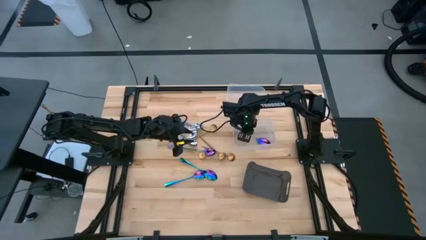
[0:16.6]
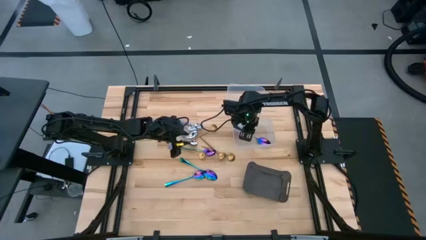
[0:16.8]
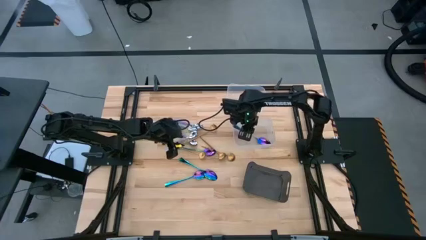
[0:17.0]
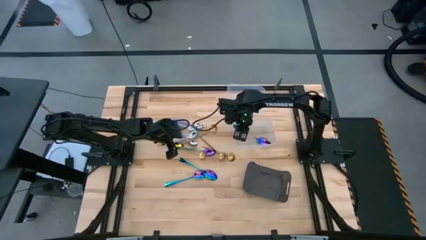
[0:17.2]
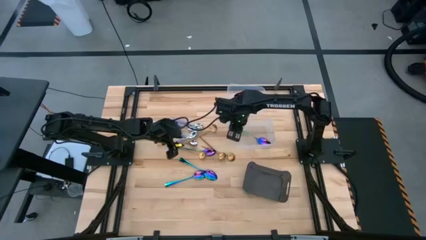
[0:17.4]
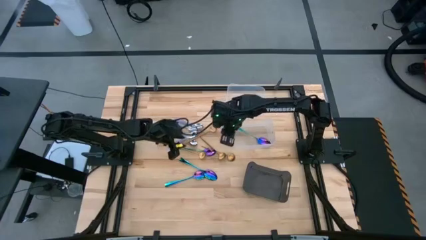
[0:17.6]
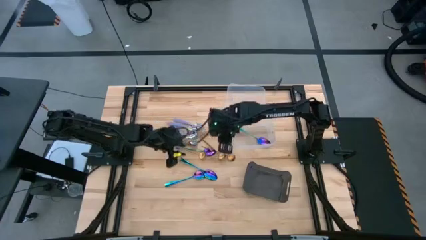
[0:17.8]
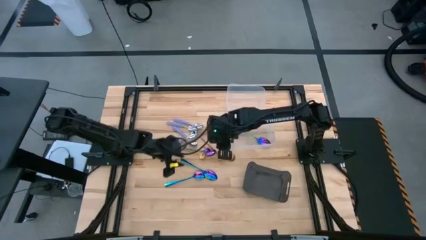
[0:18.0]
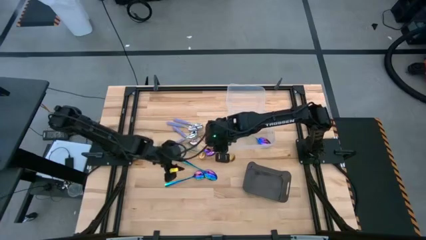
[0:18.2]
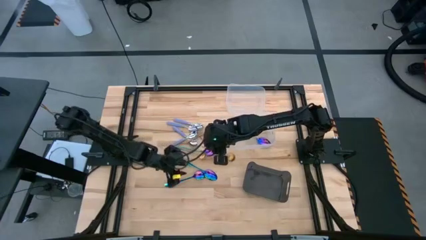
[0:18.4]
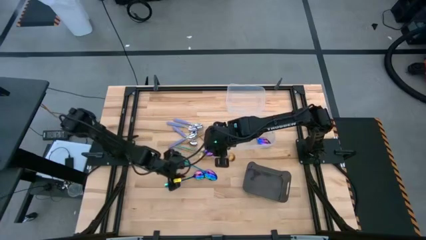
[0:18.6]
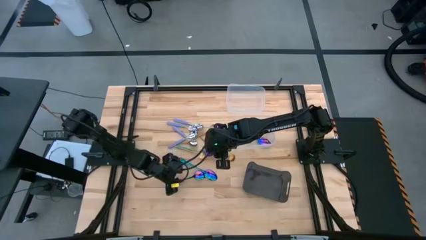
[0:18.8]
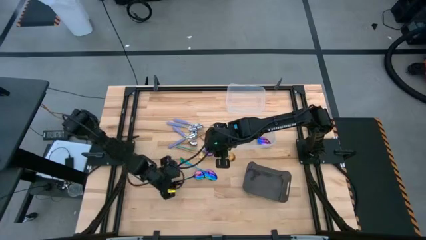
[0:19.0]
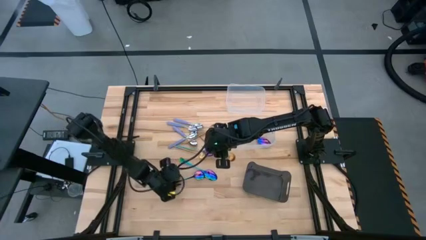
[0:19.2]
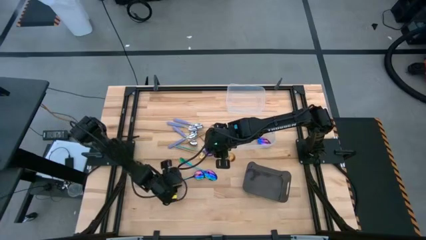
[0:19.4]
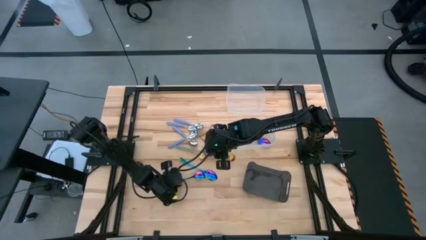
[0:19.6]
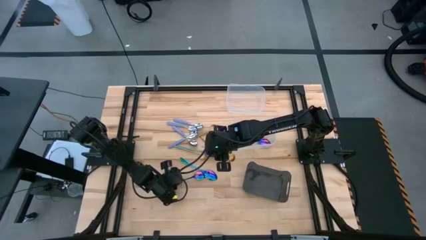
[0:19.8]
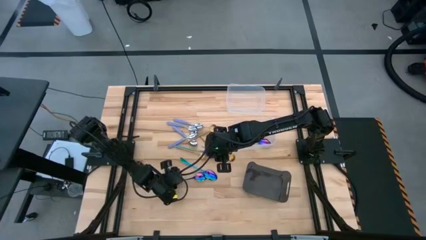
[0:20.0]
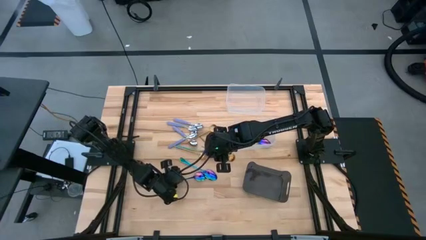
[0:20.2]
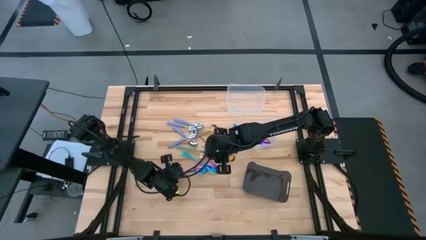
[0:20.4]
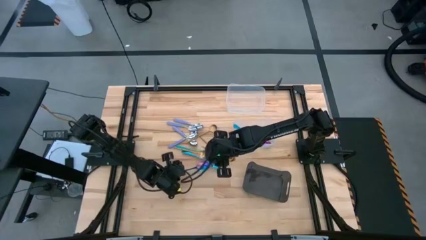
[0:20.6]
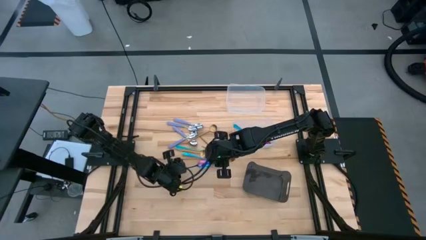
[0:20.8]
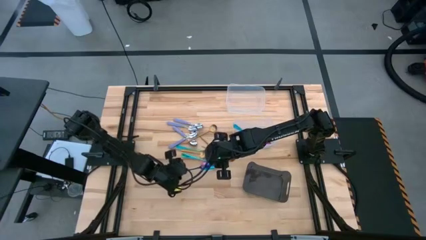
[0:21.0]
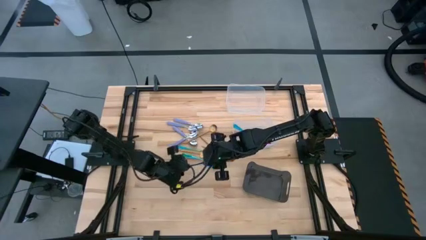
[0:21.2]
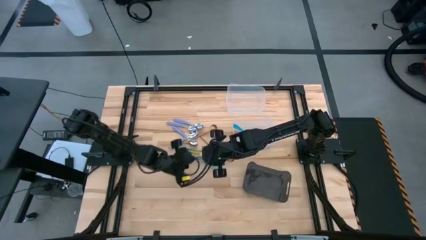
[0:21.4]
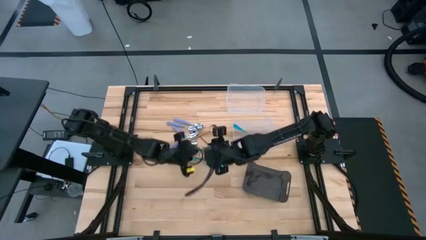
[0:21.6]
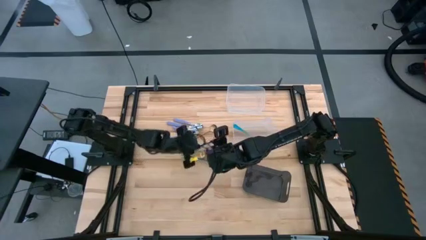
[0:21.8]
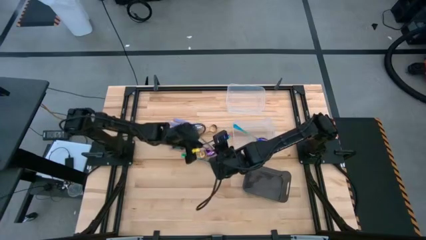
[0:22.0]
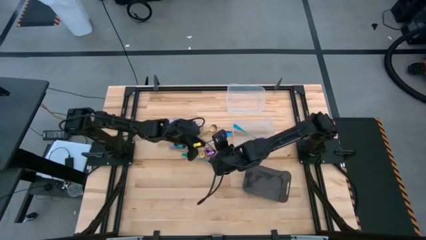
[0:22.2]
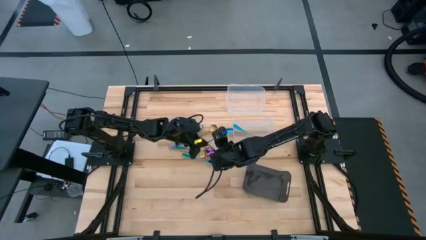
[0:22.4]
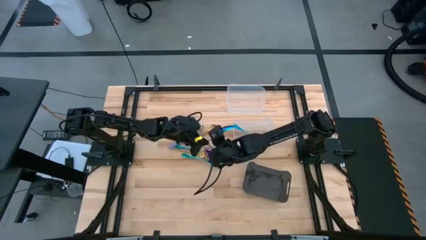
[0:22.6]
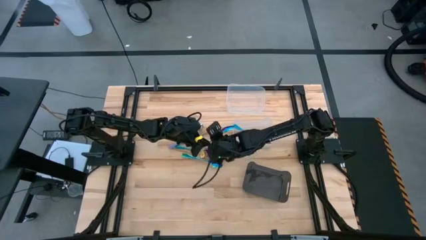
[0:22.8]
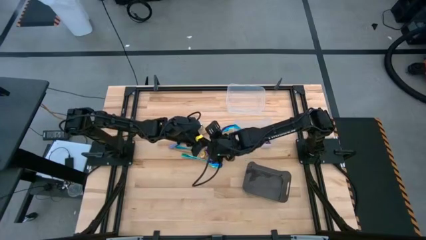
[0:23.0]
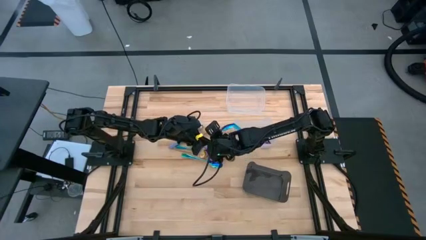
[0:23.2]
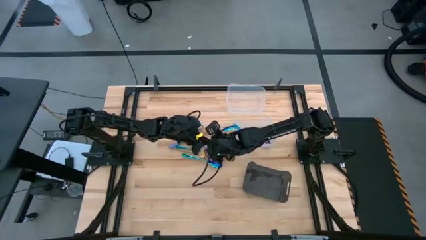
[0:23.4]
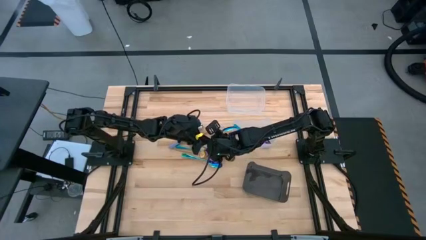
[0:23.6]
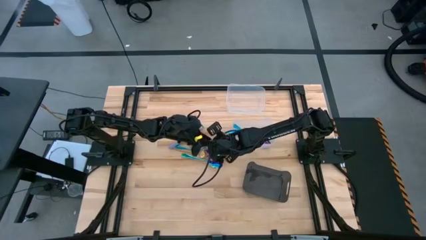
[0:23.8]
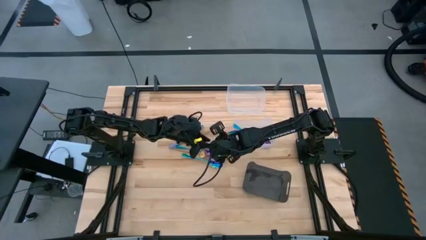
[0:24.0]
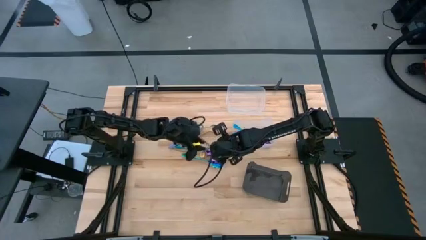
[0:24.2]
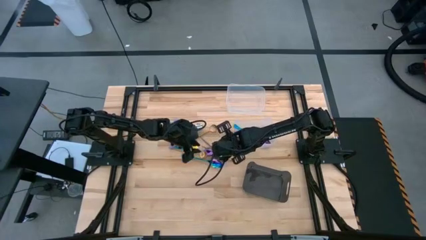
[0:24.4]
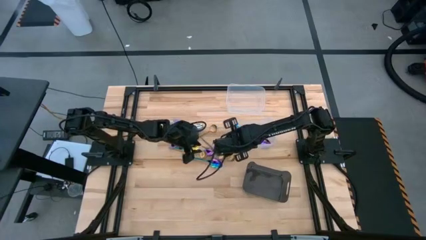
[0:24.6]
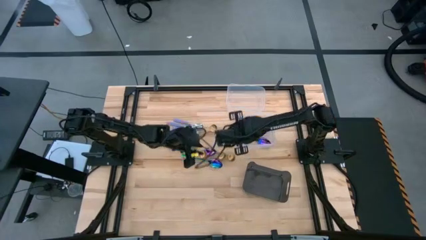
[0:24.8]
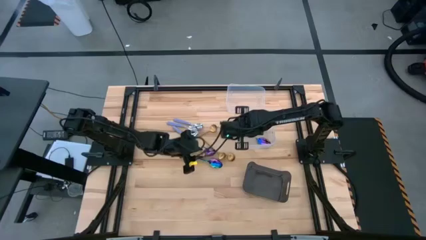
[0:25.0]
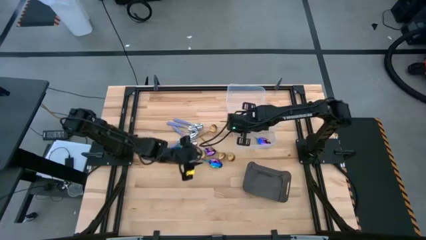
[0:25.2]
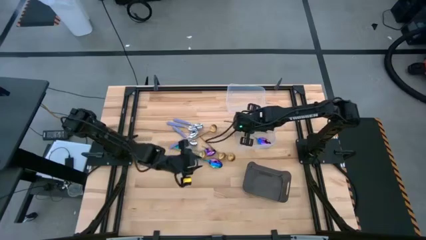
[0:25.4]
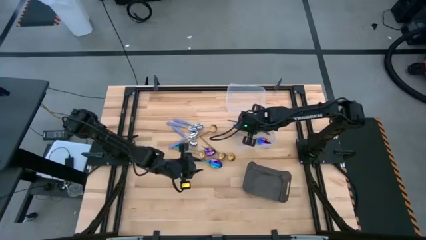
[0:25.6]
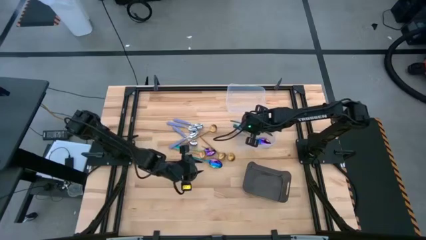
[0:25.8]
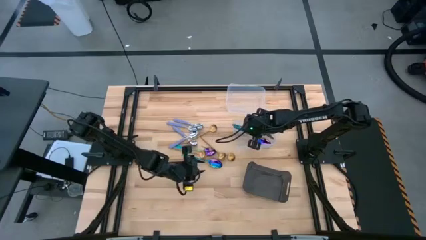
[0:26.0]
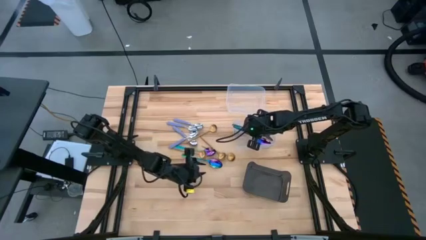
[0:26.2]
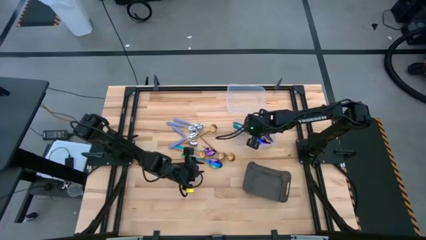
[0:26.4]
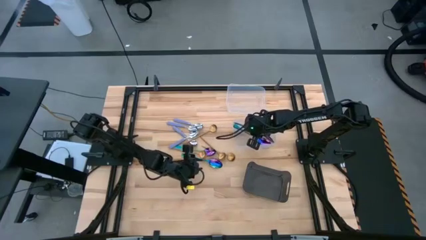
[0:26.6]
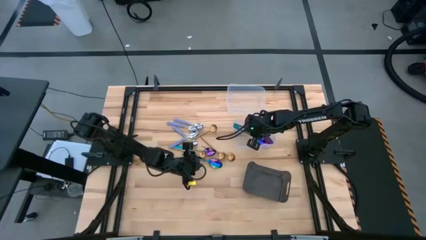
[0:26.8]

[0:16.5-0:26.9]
Task: Sort silverware by color (type)
Put the blue spoon into the bottom transparent bin

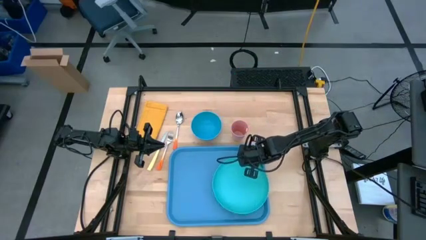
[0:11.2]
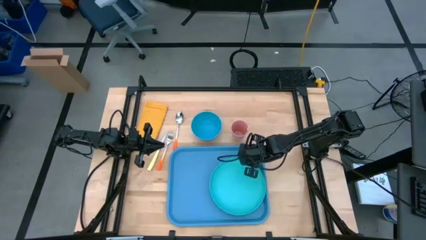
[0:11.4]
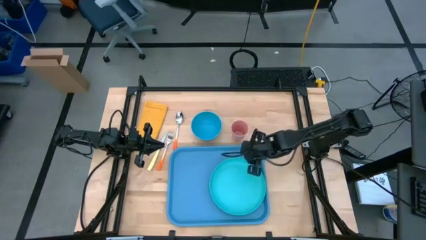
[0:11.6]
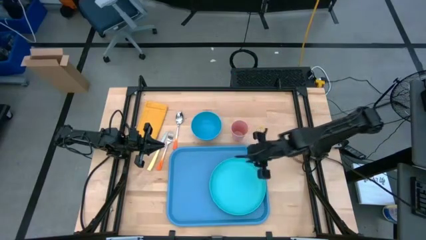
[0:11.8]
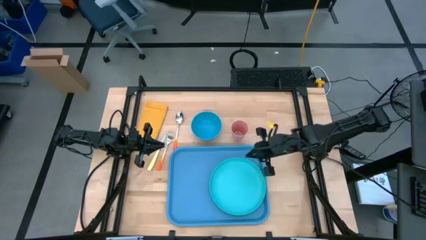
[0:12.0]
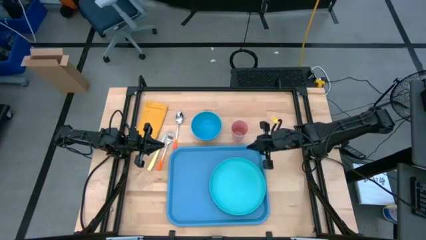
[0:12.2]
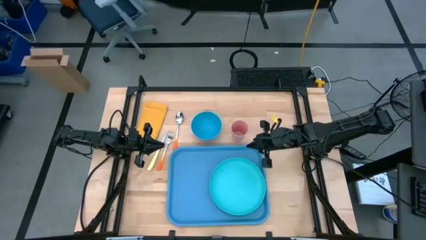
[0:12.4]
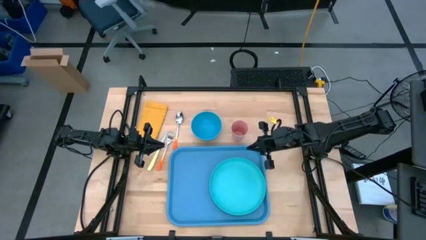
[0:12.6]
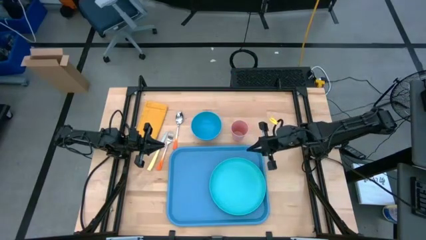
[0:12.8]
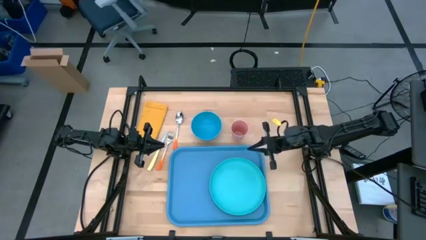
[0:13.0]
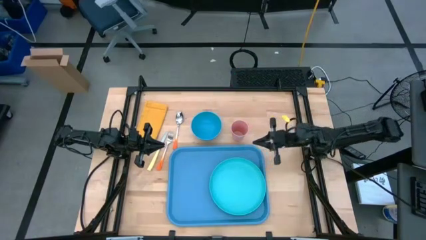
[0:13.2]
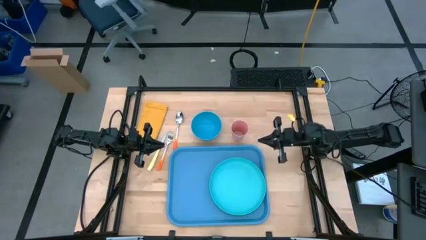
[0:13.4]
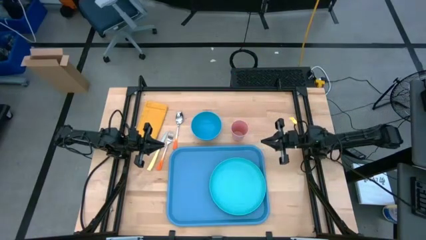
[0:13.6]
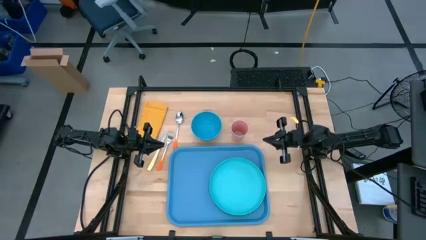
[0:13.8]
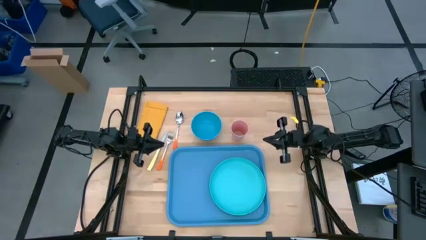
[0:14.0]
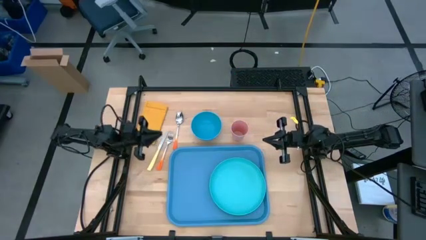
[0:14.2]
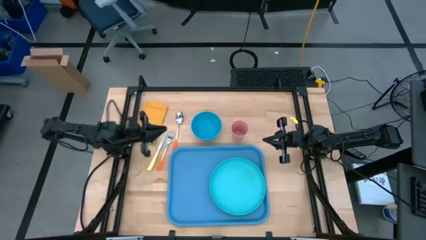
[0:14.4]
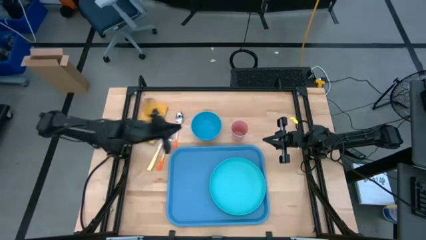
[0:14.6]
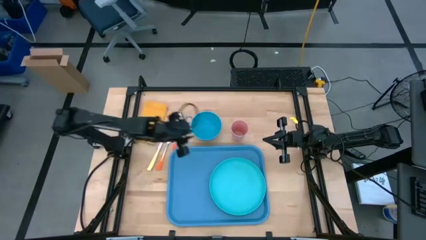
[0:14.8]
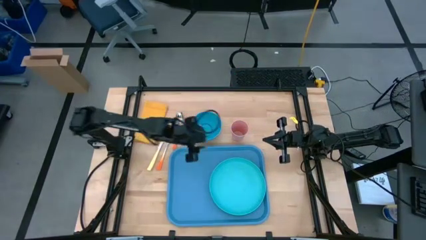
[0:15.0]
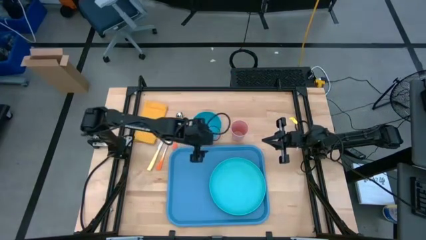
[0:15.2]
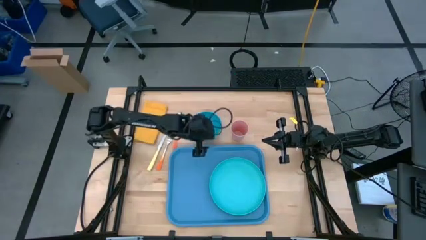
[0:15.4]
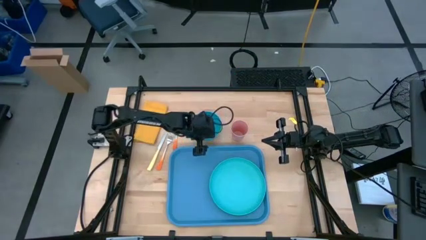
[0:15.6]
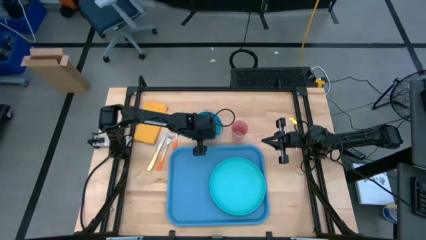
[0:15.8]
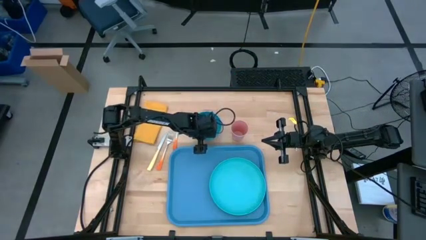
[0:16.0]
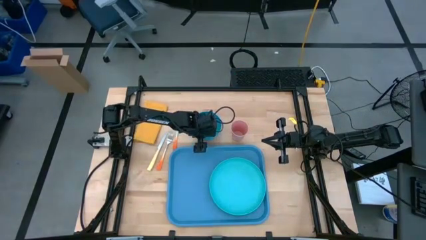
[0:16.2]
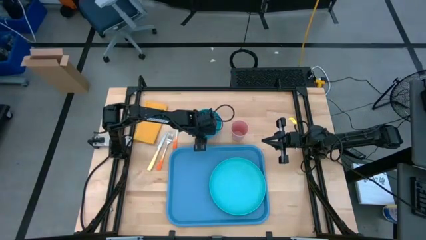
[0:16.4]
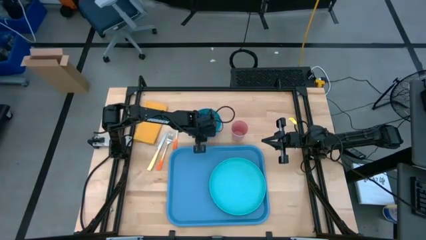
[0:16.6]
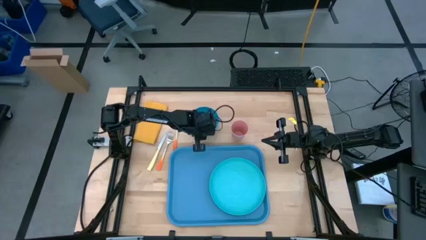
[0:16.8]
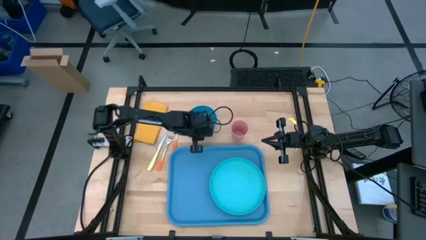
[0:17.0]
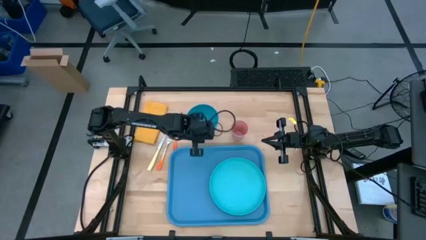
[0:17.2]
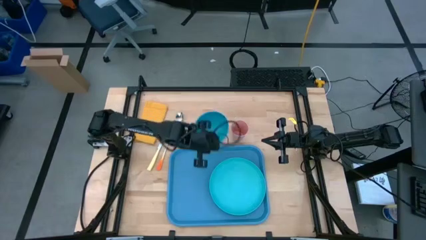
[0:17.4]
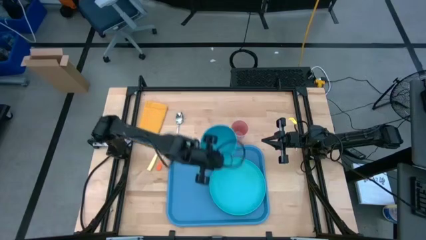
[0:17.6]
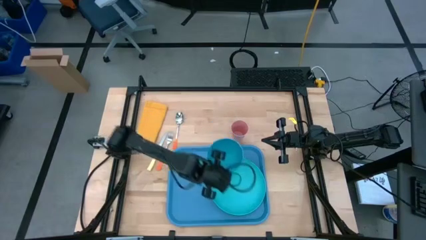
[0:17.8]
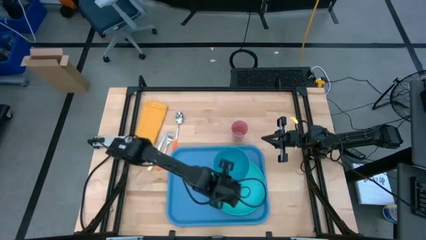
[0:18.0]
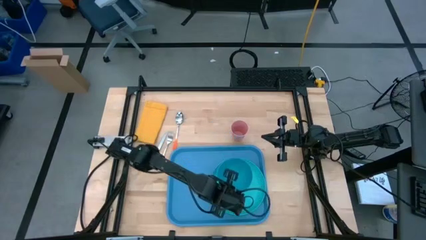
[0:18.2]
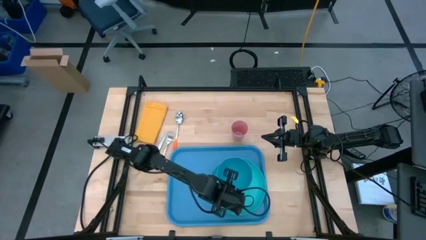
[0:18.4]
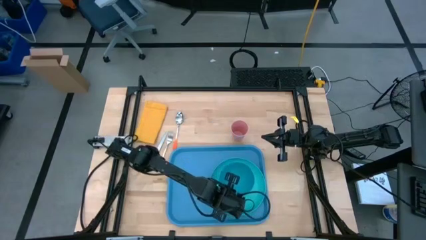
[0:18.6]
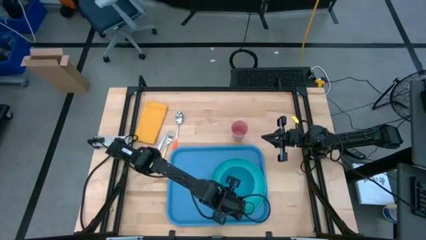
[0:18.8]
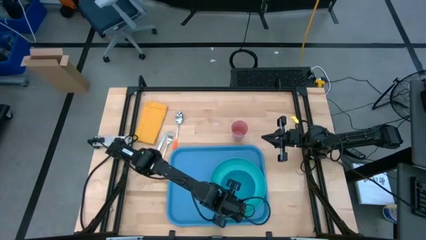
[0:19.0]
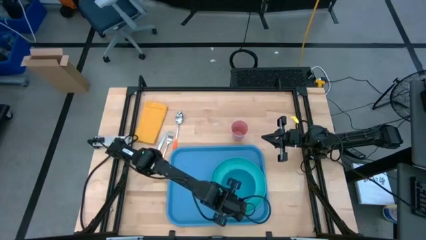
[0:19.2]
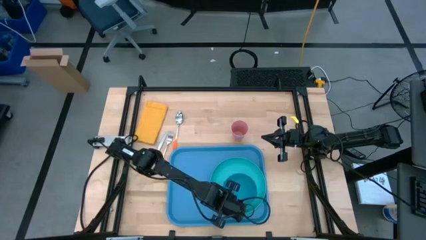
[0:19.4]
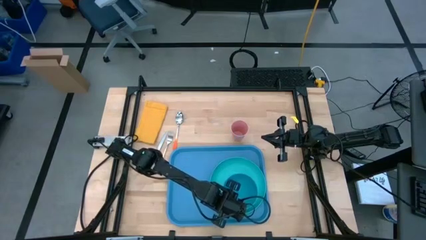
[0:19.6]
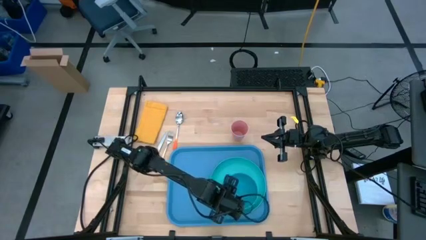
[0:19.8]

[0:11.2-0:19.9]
Task: Set up tray
Put the blue bowl on top of the light blue plate on the blue serving tray
